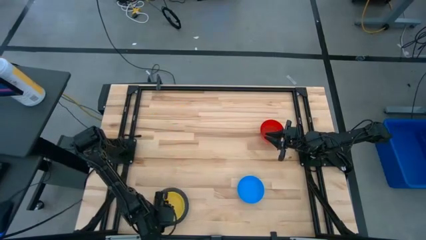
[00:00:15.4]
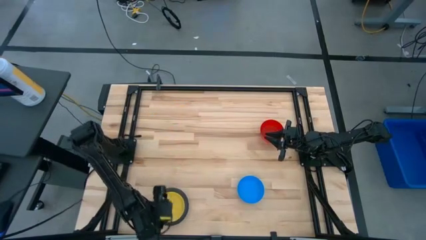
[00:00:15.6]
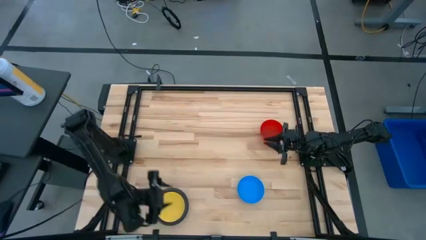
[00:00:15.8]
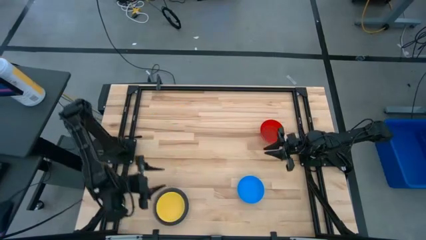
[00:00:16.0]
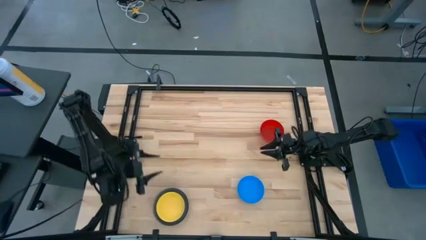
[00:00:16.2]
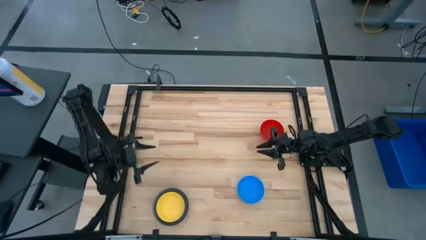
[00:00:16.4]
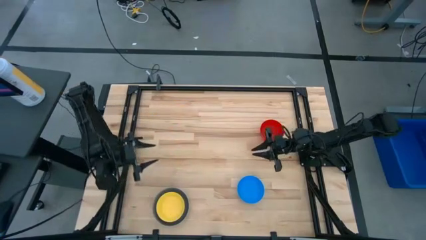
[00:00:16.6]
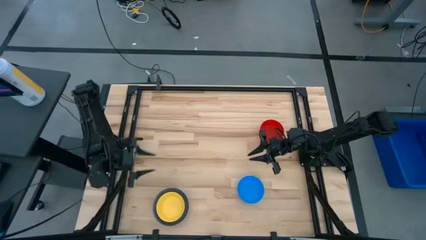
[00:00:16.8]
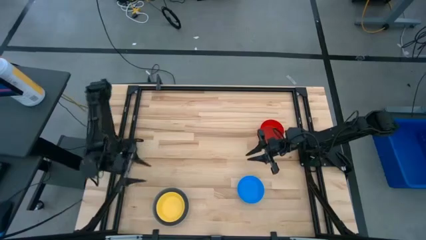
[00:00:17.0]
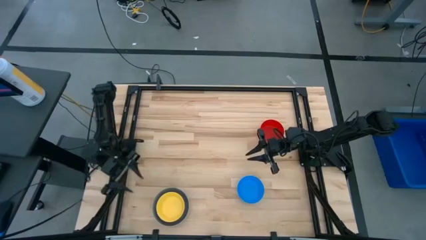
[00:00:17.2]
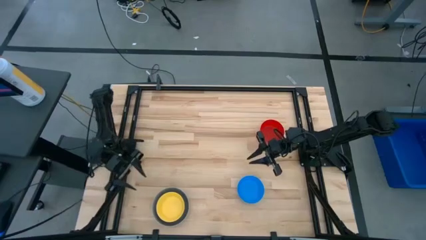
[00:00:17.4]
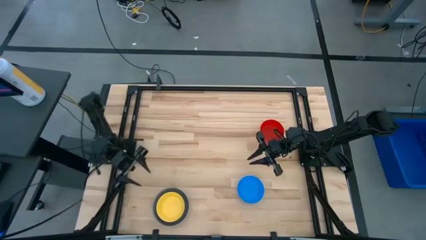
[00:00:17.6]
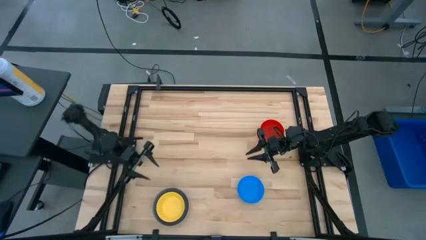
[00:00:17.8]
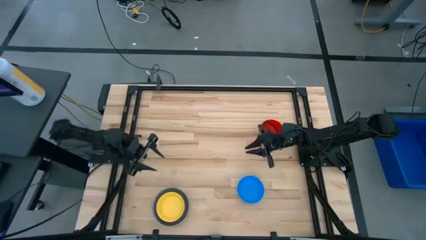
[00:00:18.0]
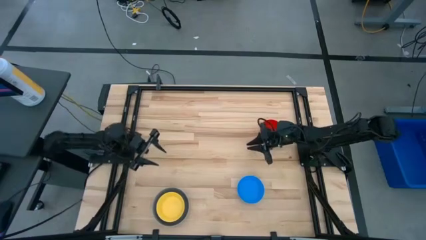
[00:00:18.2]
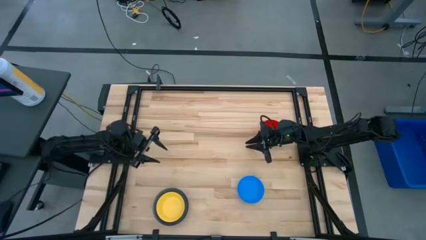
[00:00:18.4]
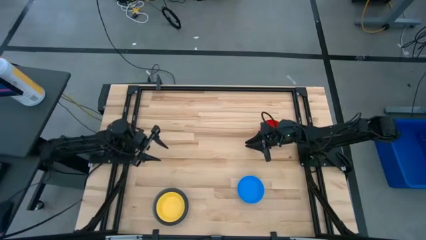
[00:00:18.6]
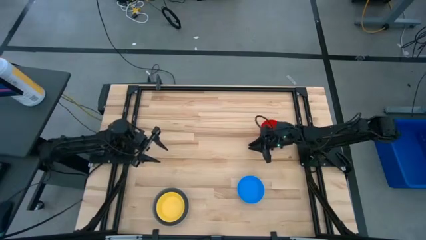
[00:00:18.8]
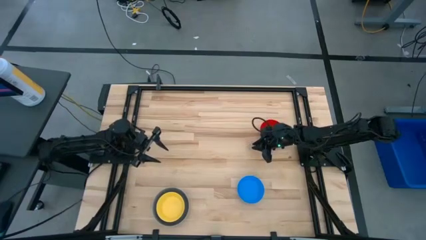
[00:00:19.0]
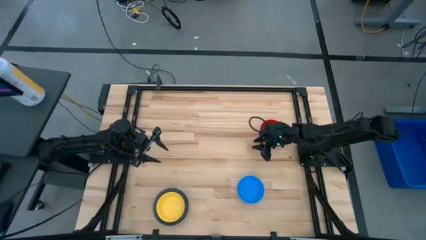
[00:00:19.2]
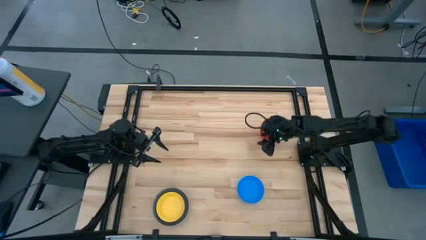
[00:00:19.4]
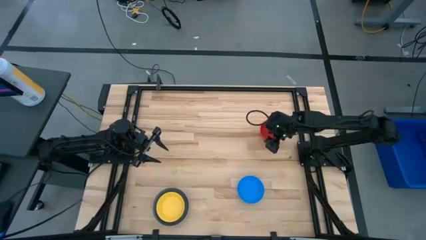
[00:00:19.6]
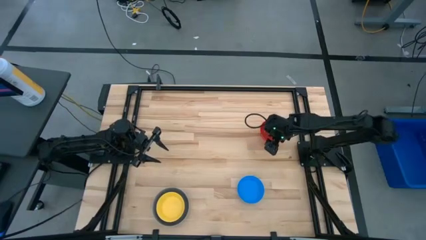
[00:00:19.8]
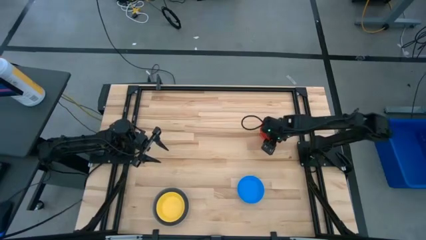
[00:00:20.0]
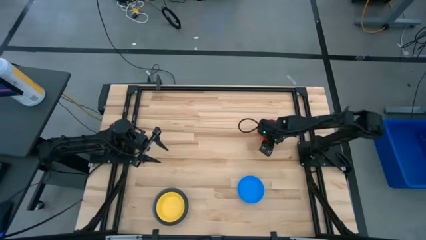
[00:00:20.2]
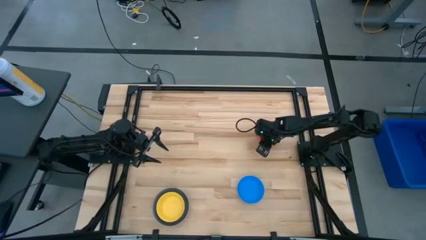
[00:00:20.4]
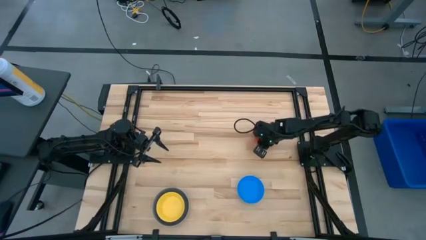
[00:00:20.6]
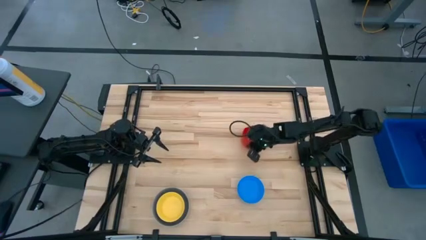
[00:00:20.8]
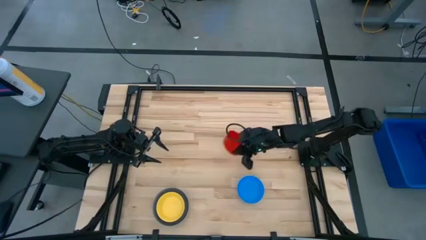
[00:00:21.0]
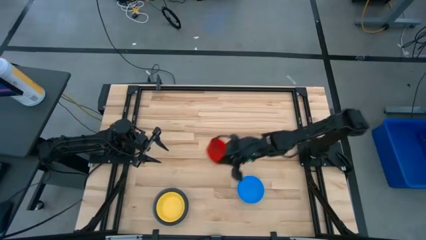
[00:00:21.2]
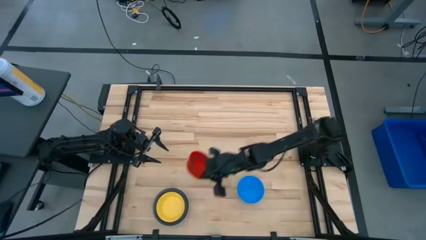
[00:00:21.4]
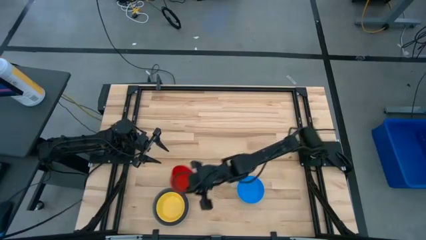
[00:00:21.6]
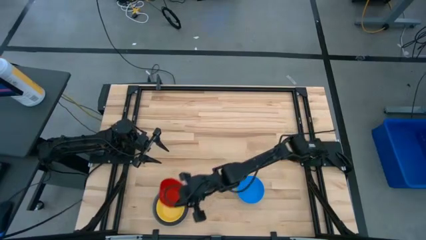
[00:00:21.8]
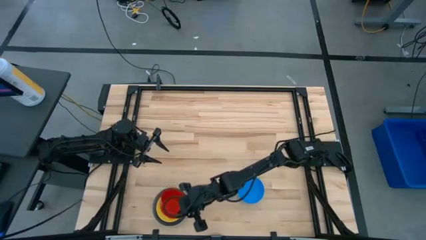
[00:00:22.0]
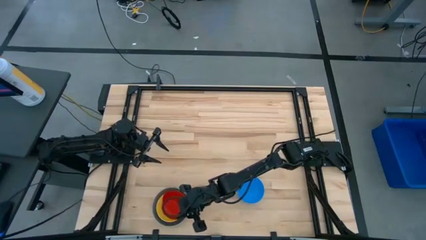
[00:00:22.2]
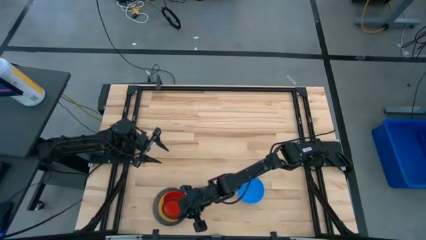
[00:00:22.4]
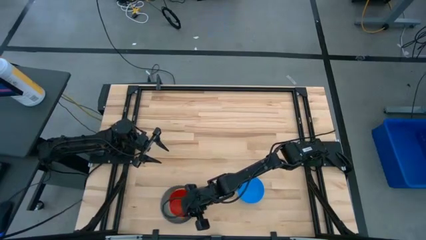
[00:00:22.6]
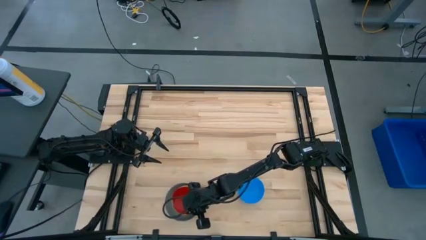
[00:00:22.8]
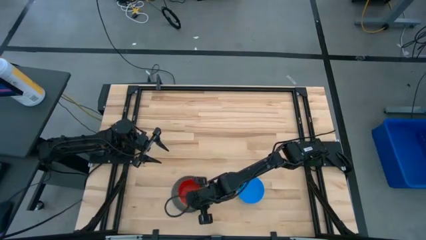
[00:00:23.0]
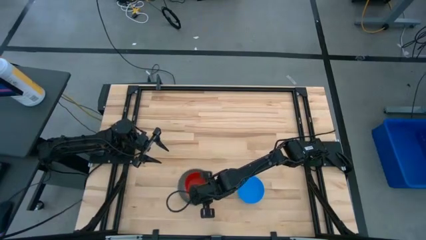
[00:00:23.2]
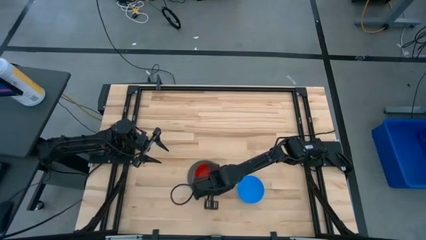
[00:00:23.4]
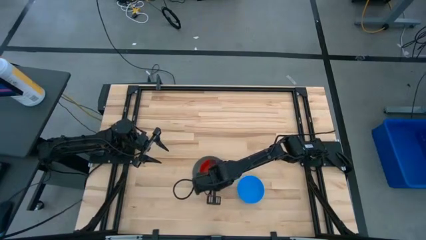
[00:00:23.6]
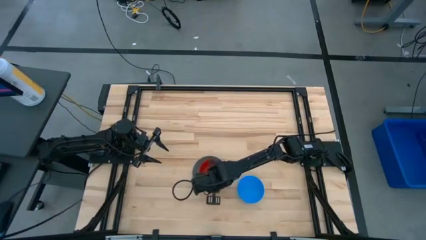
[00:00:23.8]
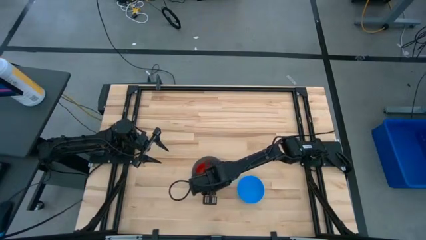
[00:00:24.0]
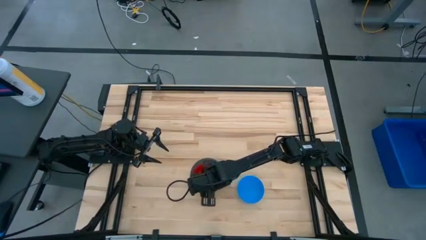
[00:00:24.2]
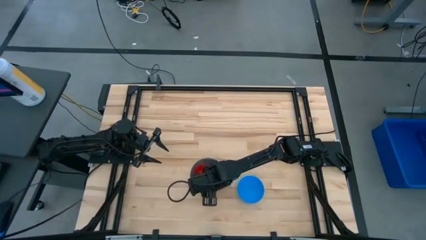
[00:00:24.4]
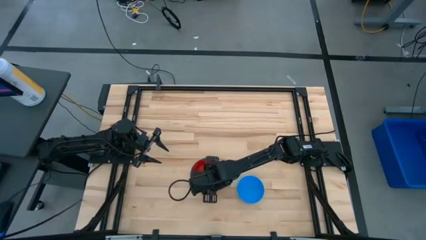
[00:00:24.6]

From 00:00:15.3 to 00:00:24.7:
Stack the red bowl on the yellow bowl

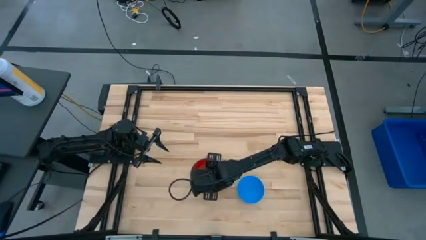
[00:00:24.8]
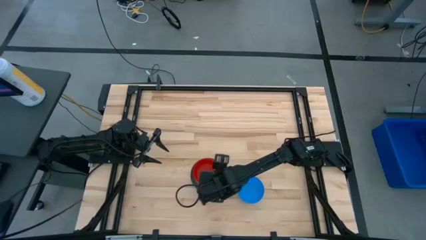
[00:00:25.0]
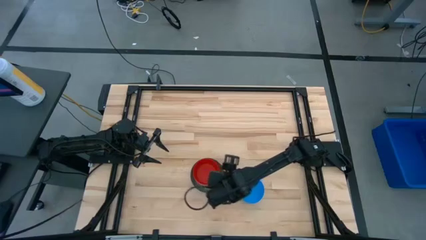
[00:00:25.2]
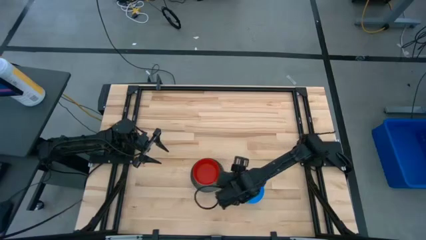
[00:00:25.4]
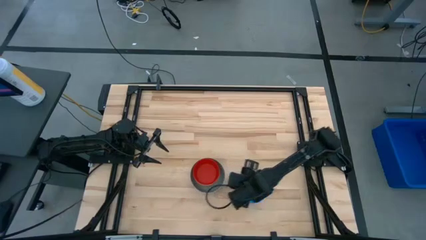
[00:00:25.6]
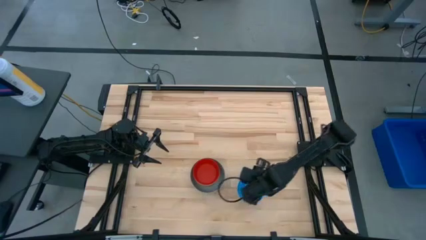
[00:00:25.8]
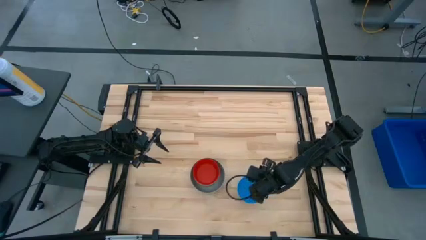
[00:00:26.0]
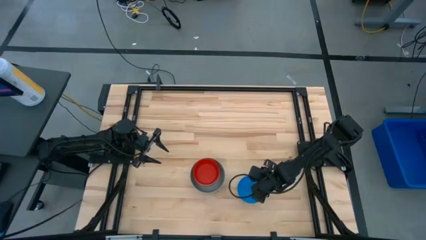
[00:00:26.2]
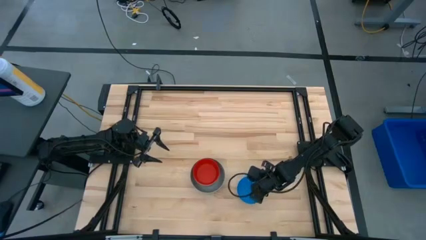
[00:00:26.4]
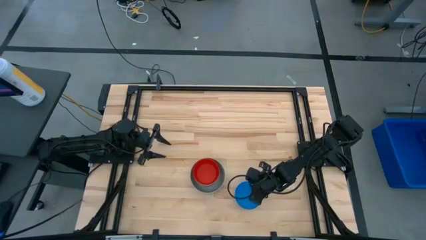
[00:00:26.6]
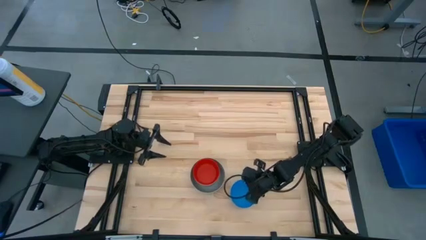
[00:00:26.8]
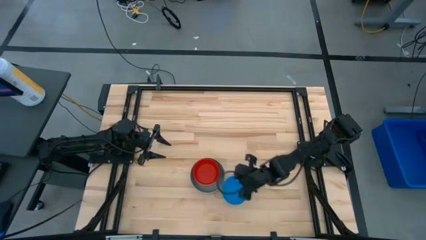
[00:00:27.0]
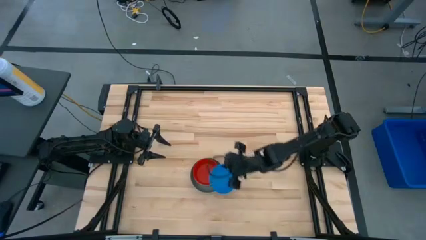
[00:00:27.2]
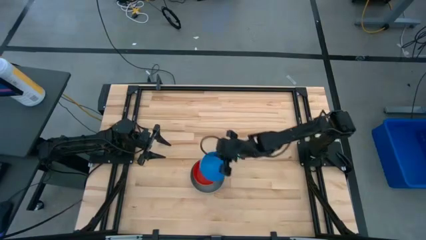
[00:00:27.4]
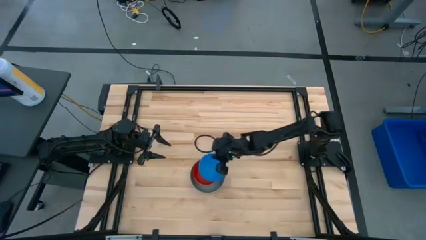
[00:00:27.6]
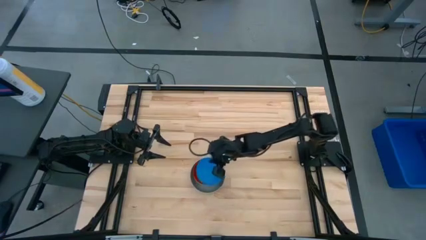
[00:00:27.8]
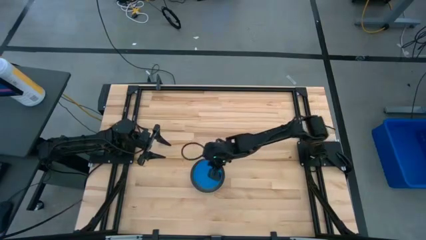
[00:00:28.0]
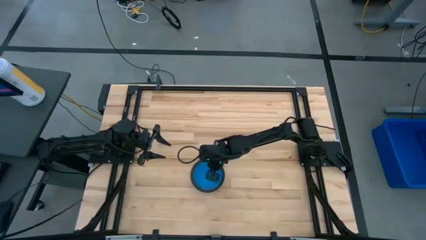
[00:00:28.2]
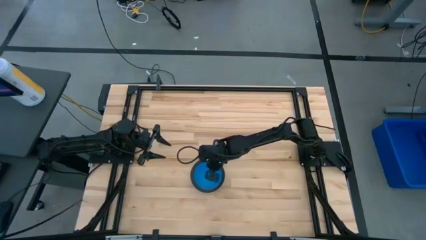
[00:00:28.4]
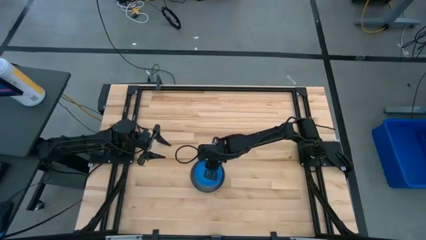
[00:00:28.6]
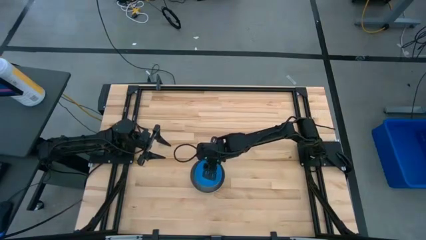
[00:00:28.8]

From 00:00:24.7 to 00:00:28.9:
Stack the light blue bowl on the red bowl
